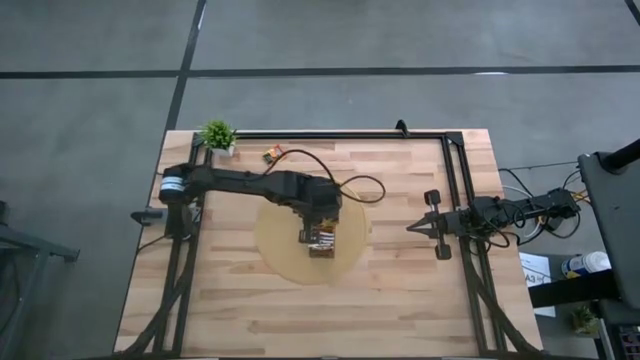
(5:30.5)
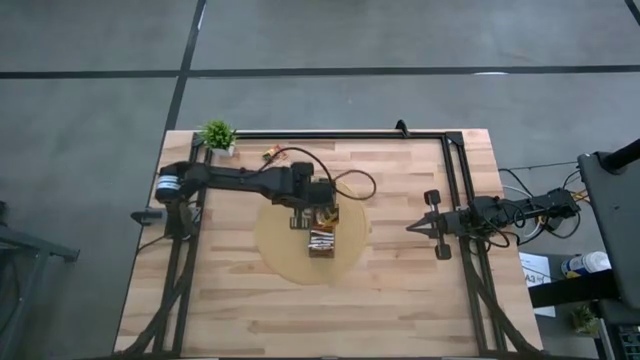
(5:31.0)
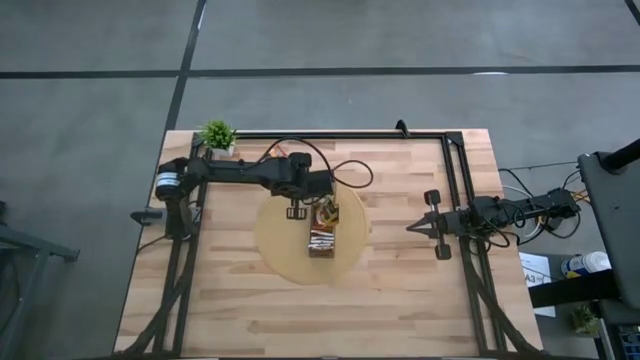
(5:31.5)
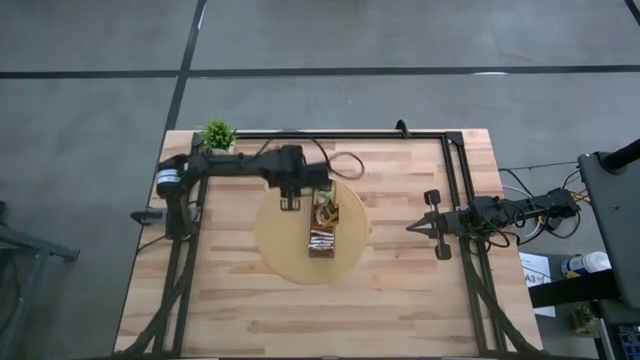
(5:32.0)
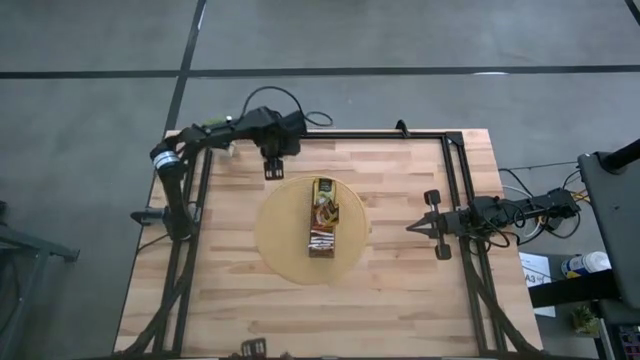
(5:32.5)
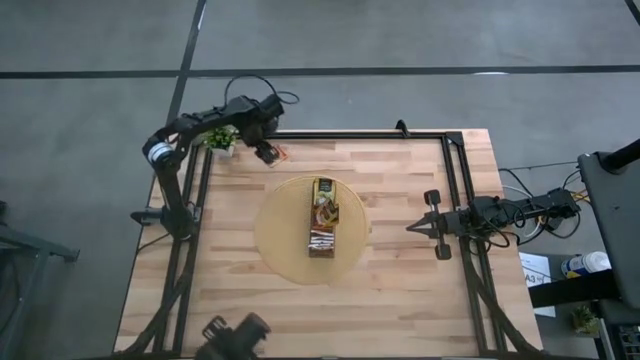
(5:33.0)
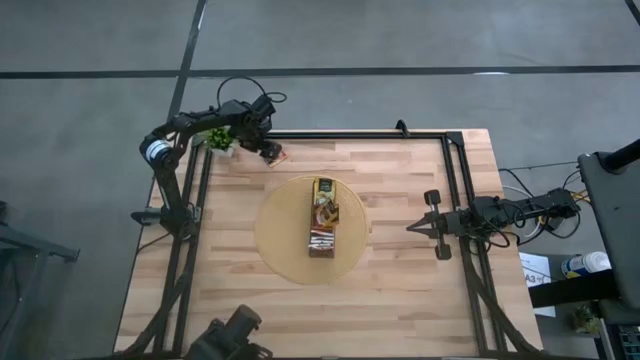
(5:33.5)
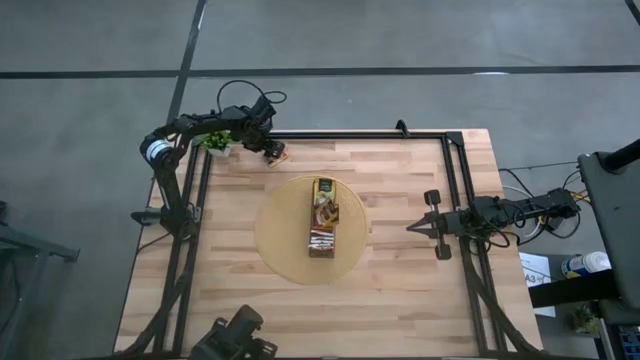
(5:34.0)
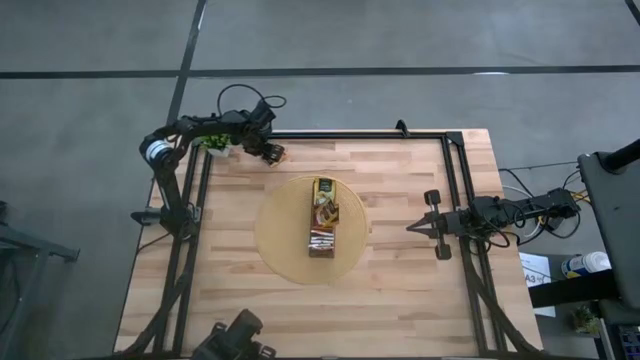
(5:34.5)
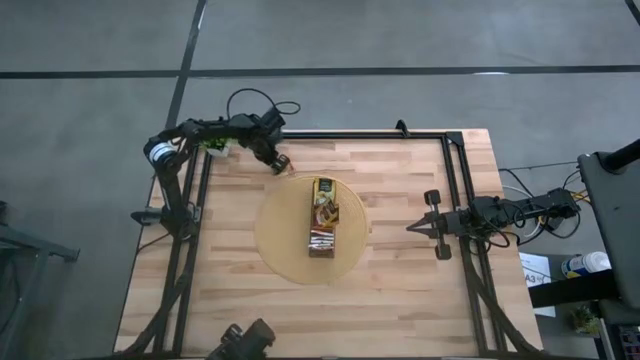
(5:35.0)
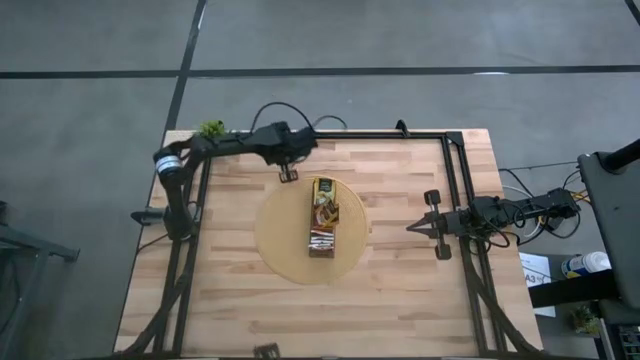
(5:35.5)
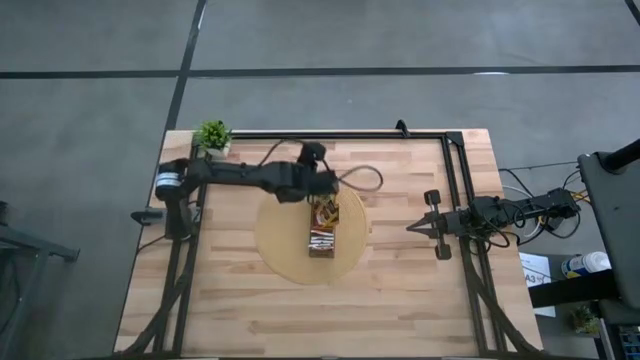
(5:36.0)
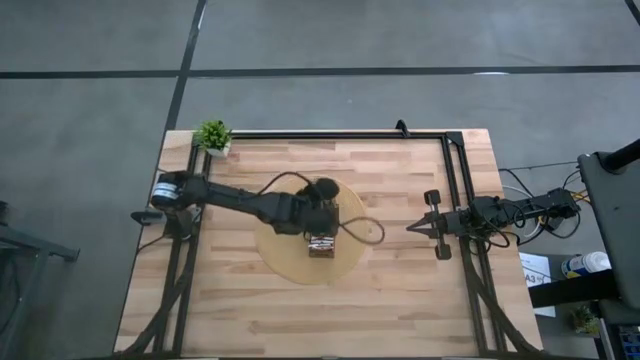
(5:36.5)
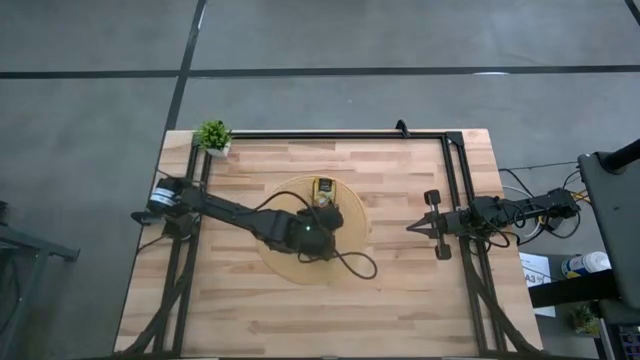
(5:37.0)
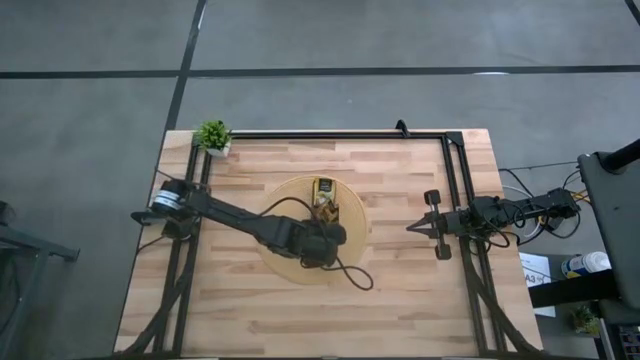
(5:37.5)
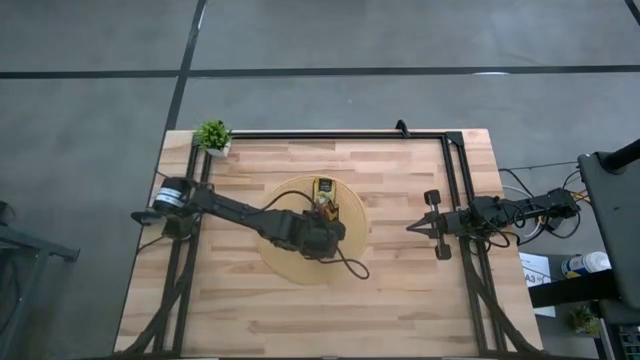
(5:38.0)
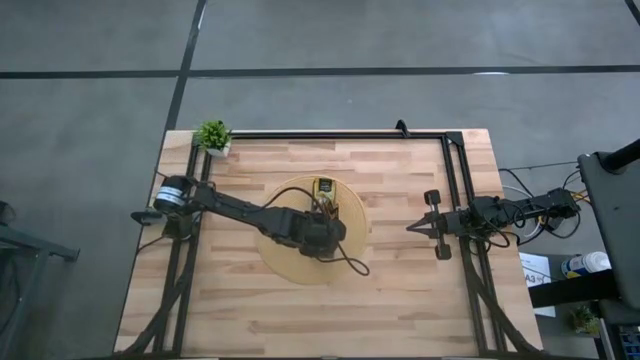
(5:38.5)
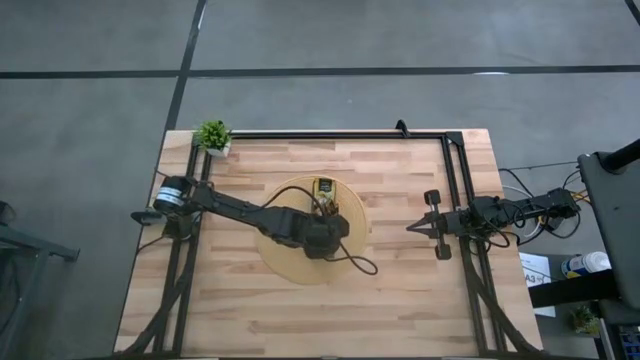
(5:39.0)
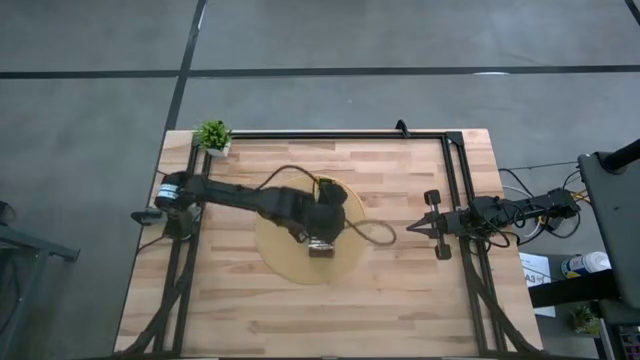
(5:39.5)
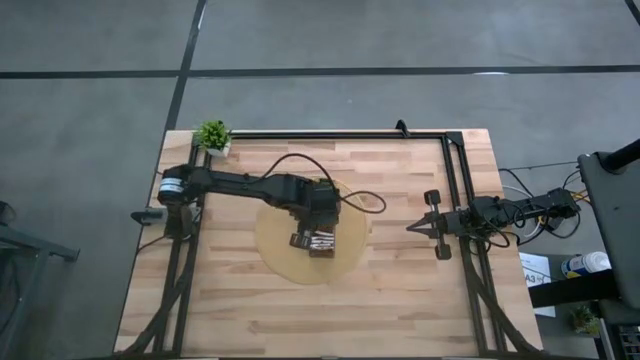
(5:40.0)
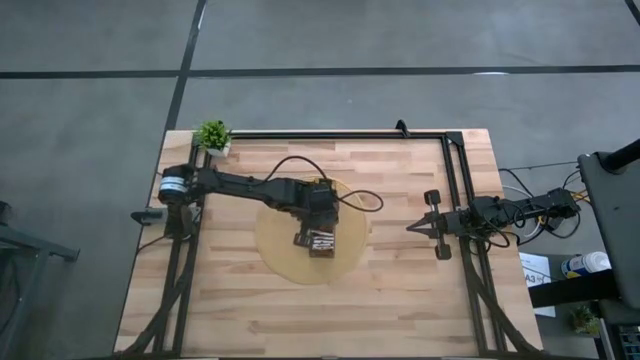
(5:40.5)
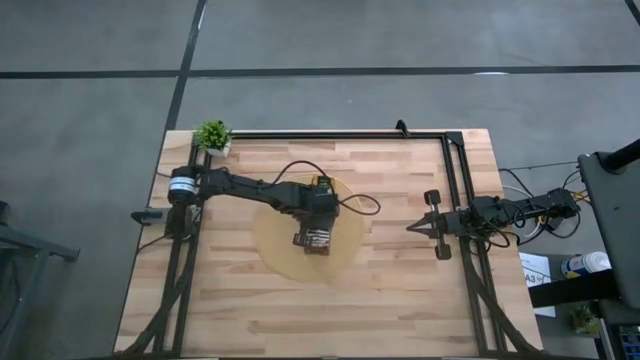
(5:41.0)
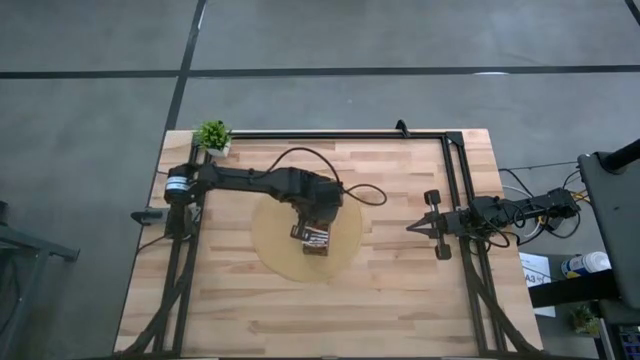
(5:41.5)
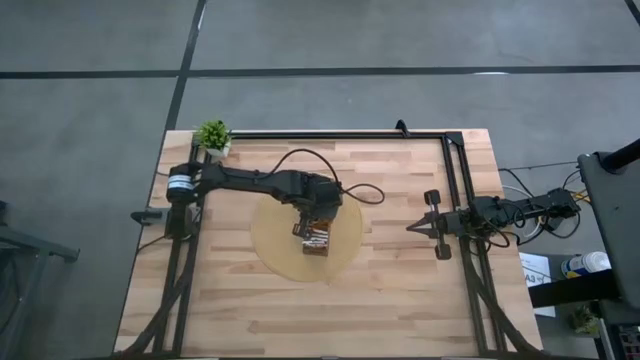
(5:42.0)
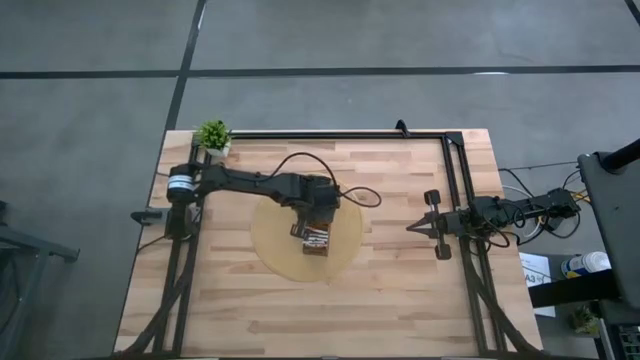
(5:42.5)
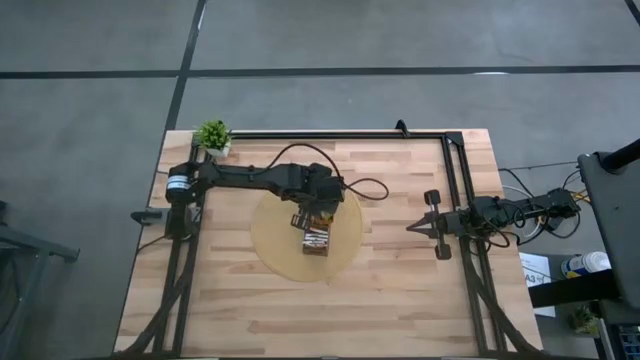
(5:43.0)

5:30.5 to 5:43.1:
Task: Pick & Place Tea
Put the orange tea bag into the middle section of the wooden organizer

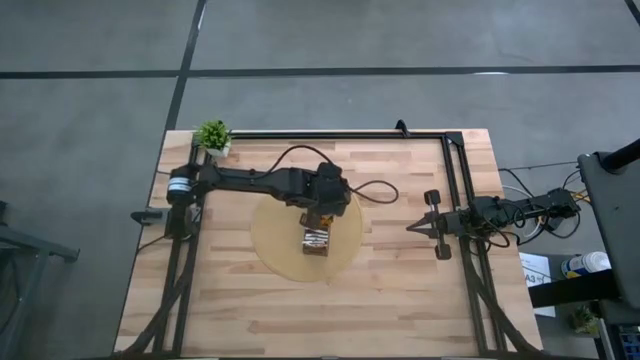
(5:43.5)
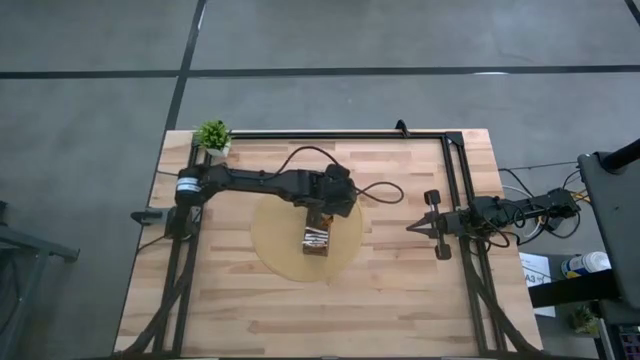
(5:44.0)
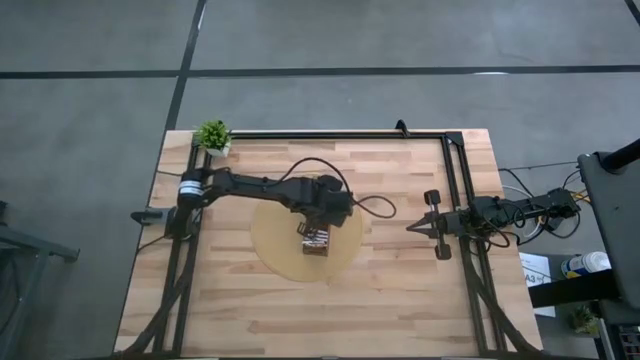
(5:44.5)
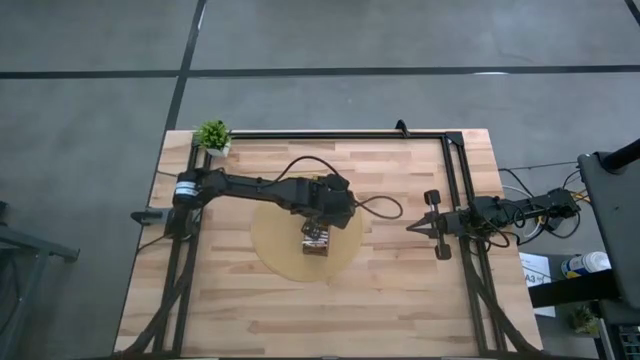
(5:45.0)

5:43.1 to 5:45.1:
Adjust the orange tea bags in the wooden organizer

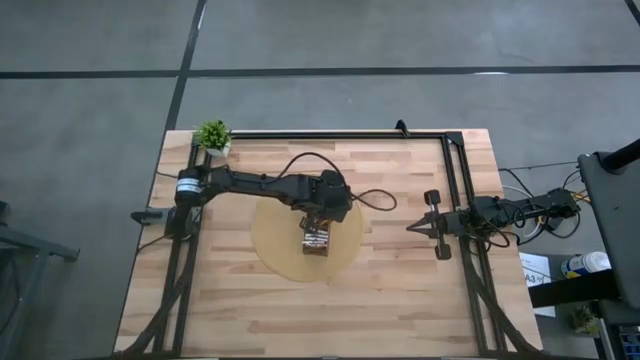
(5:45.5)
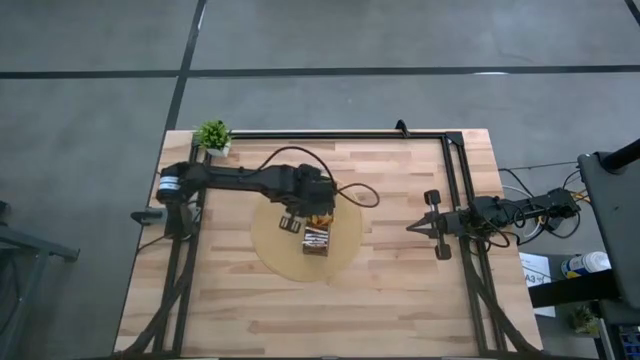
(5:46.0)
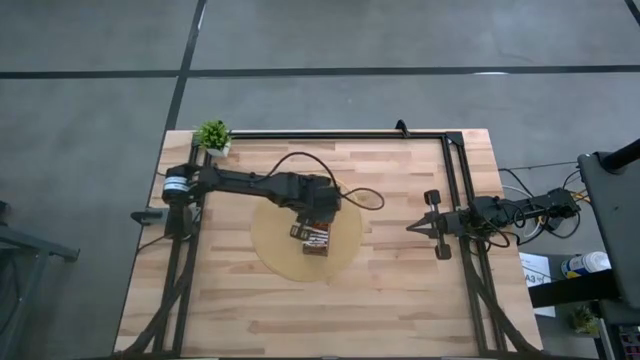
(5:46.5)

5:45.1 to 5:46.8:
Adjust the orange tea bag in the wooden organizer

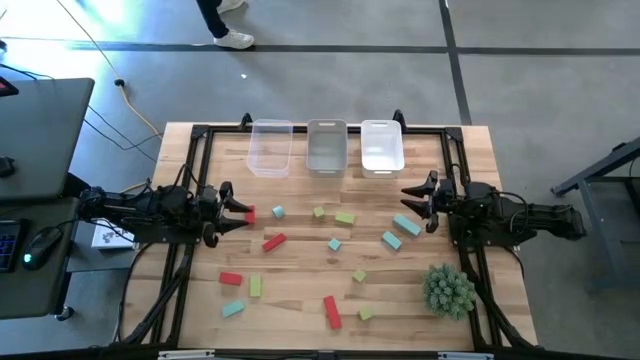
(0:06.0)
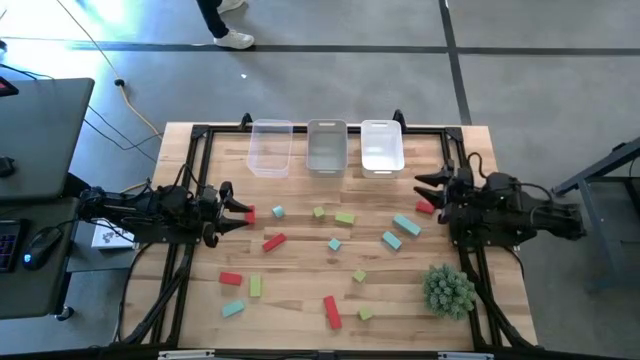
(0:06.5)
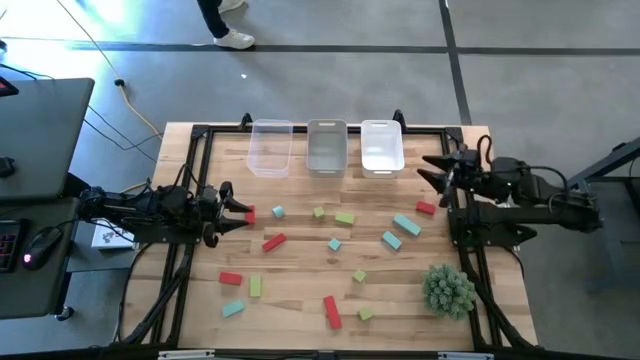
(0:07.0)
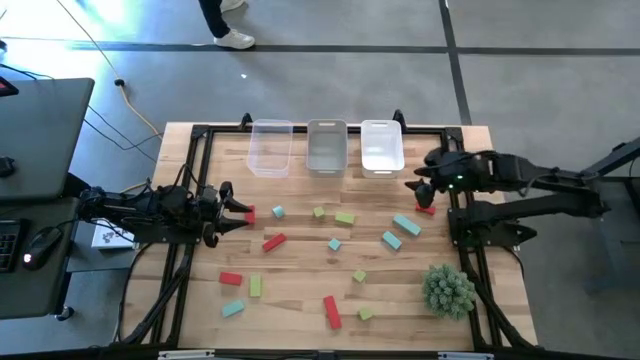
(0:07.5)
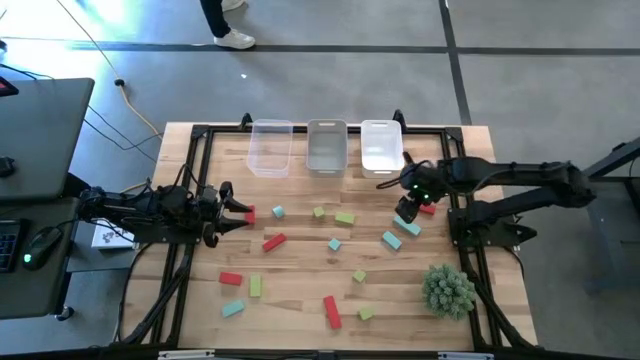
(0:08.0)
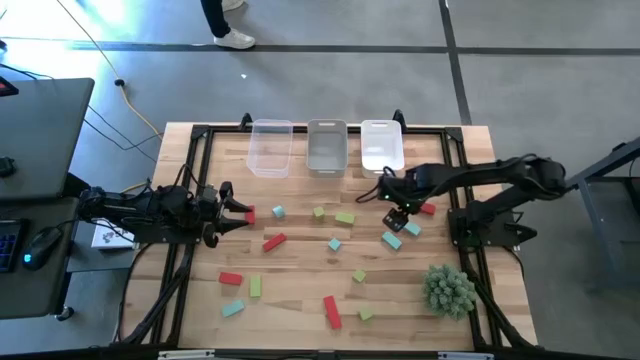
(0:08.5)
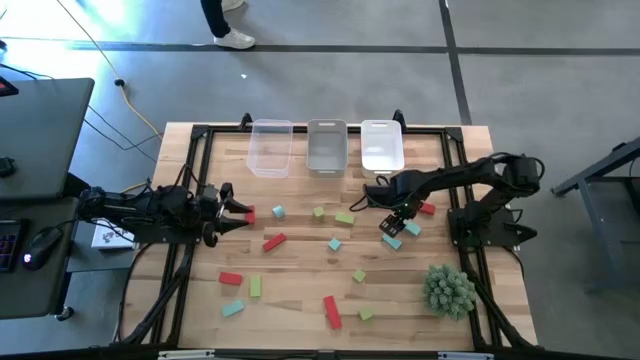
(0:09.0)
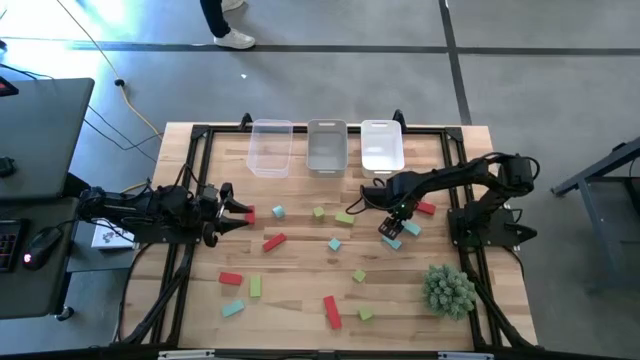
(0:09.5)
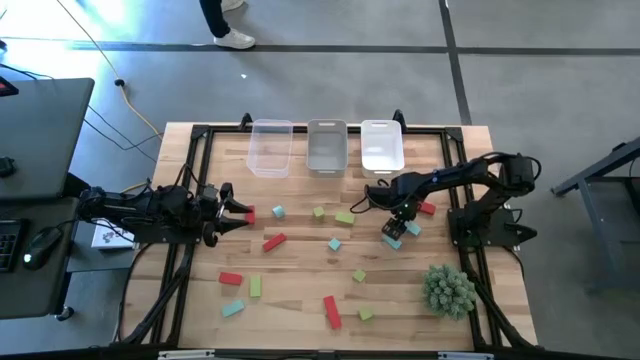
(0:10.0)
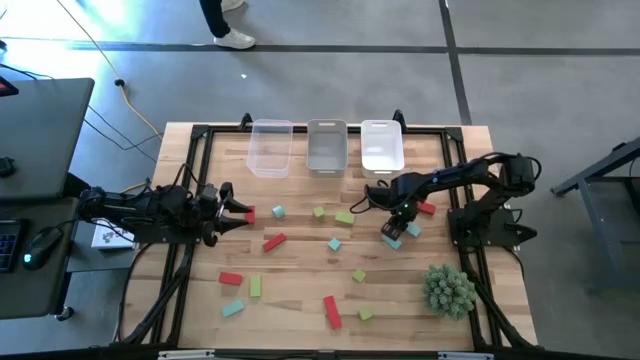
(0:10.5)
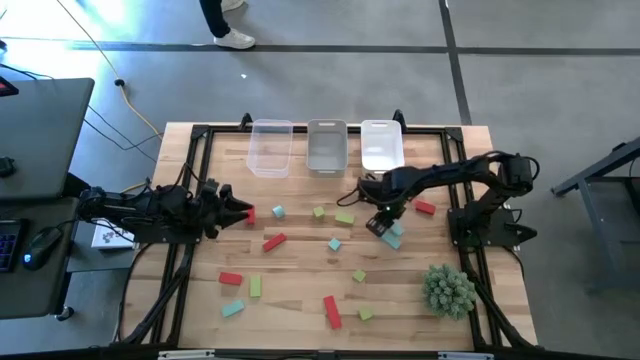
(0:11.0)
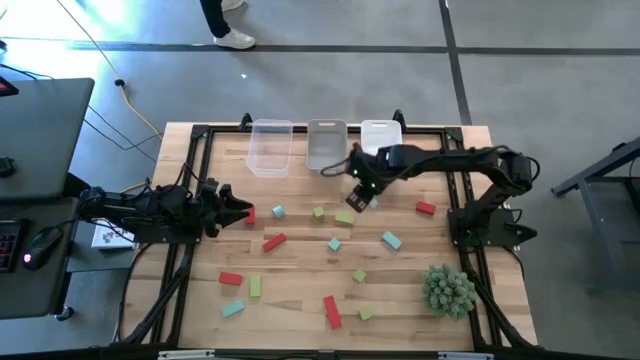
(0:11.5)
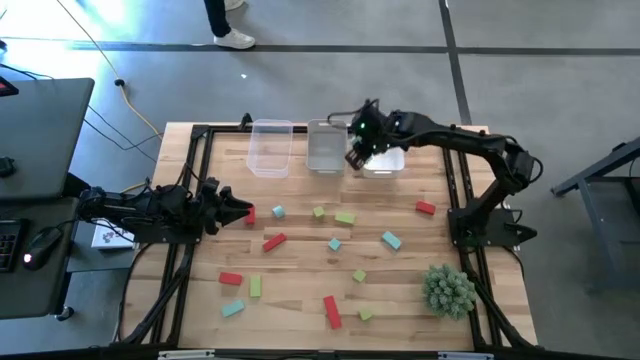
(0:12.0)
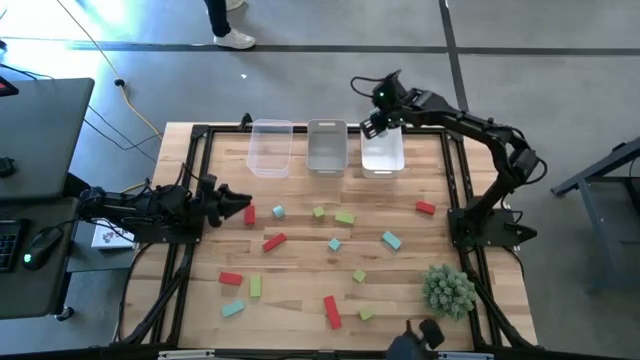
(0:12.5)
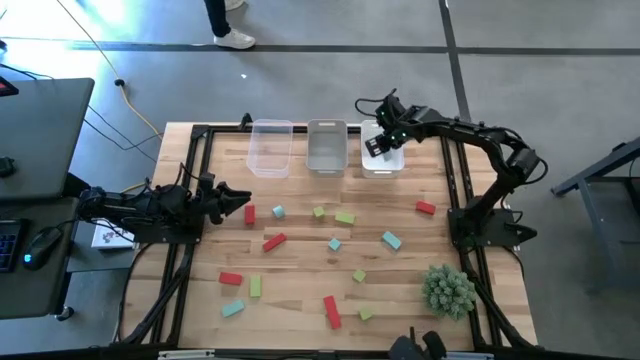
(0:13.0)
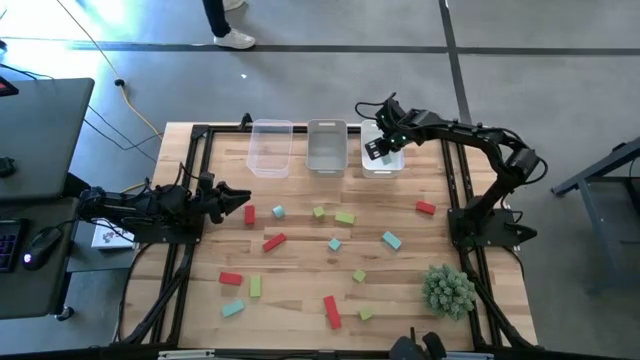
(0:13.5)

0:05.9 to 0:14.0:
Task: Sort & place blocks by color
Put the blue block into the white bin
